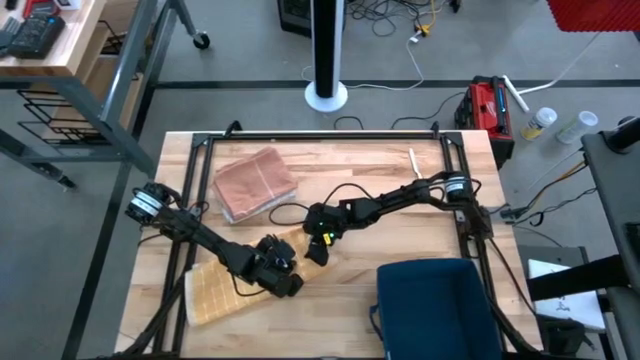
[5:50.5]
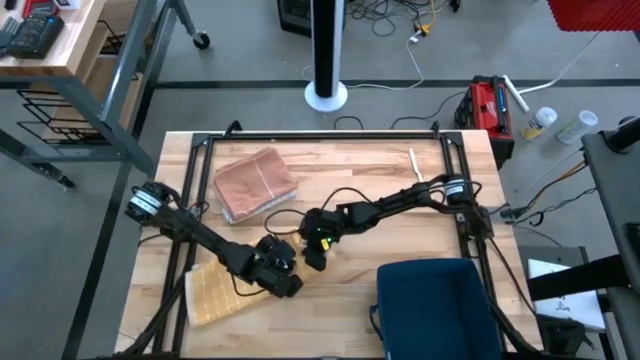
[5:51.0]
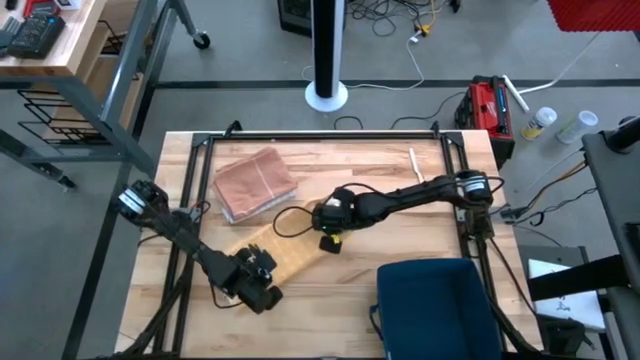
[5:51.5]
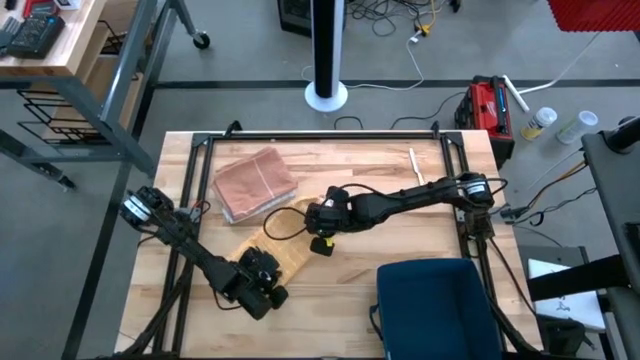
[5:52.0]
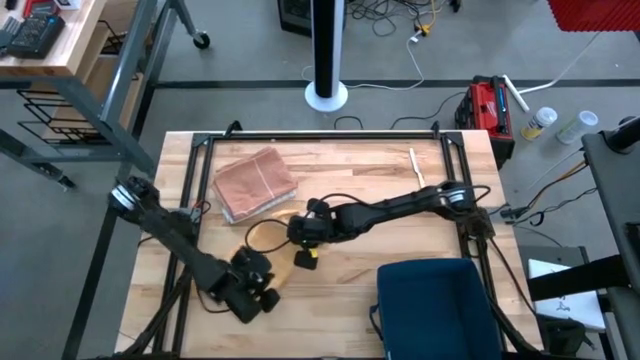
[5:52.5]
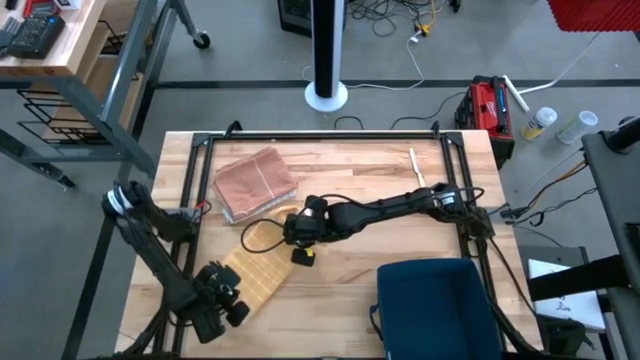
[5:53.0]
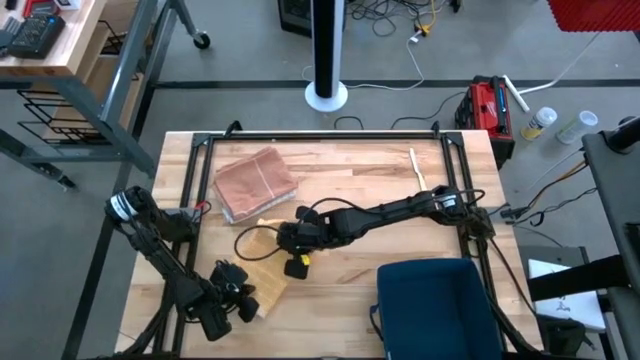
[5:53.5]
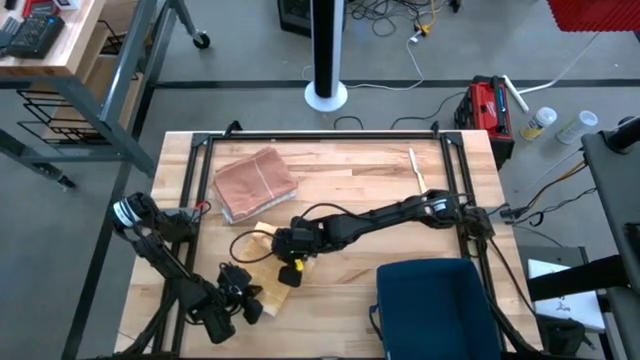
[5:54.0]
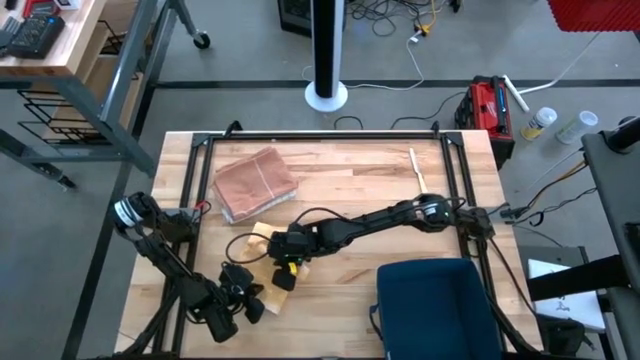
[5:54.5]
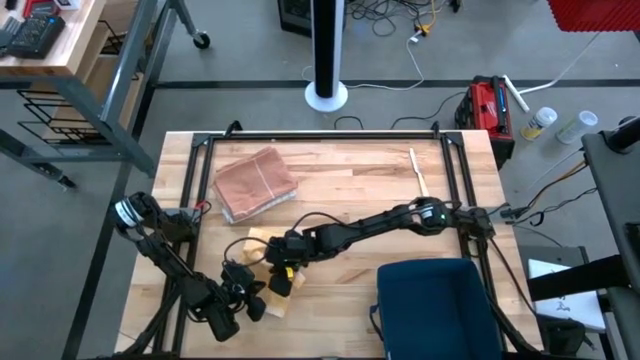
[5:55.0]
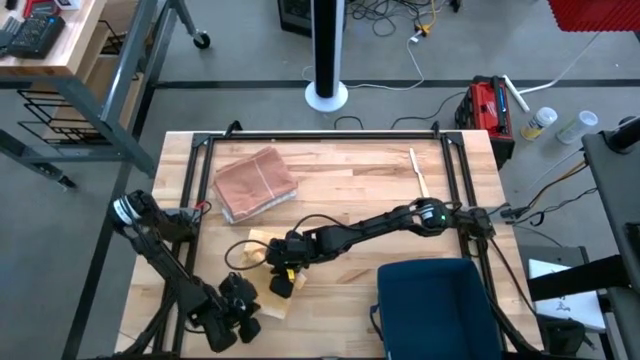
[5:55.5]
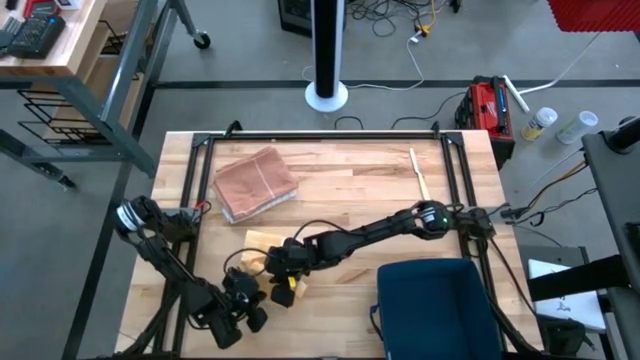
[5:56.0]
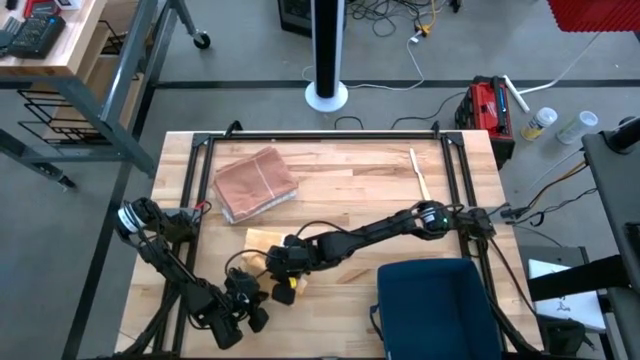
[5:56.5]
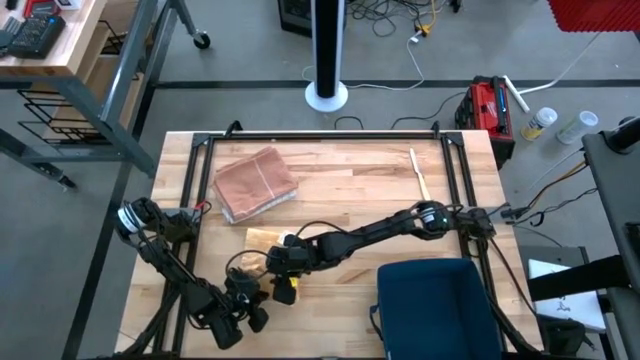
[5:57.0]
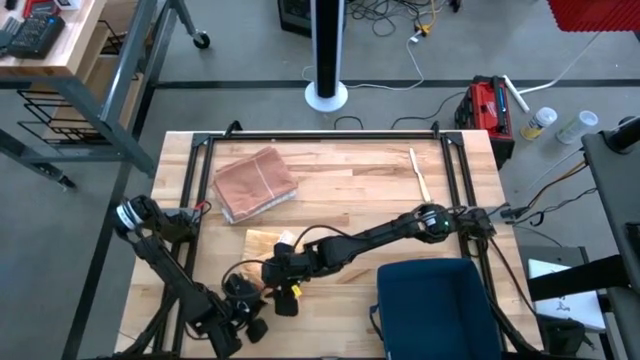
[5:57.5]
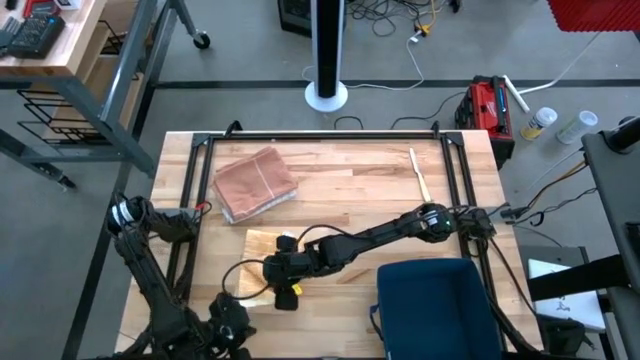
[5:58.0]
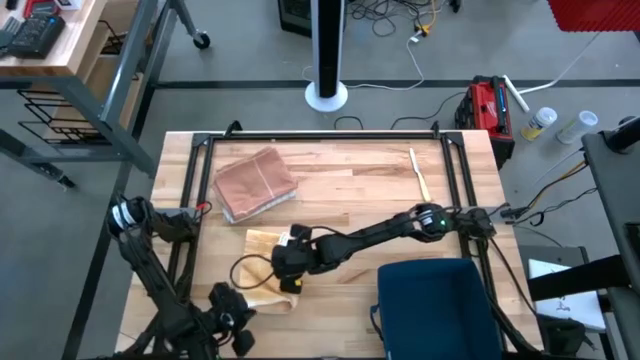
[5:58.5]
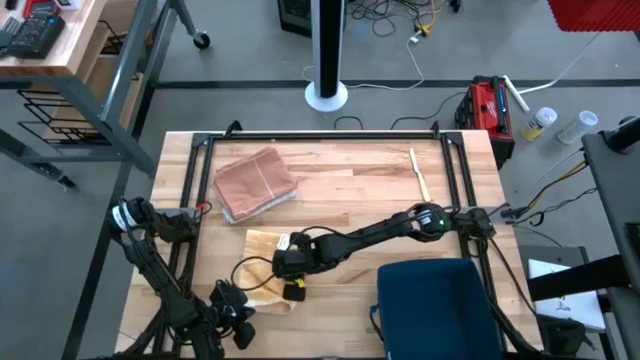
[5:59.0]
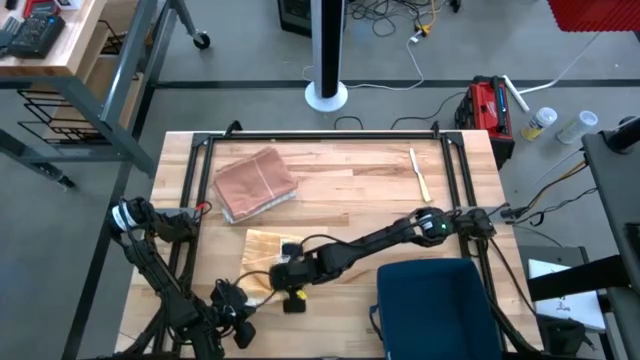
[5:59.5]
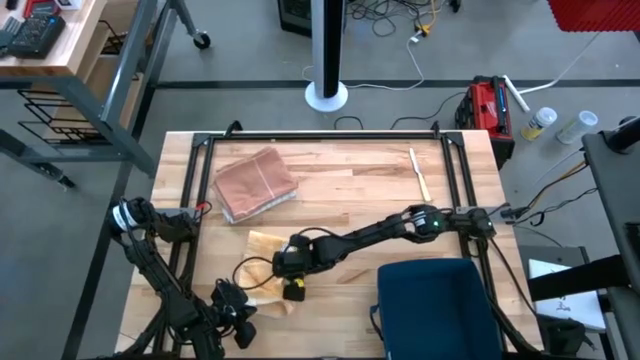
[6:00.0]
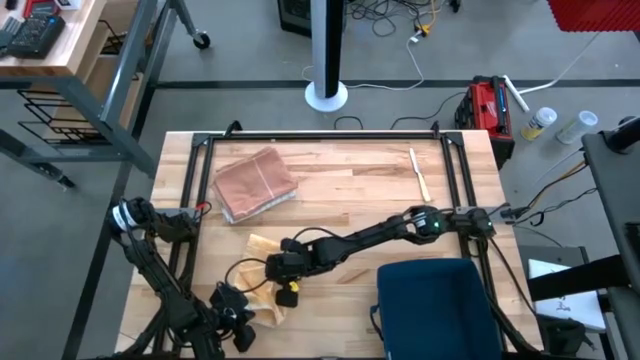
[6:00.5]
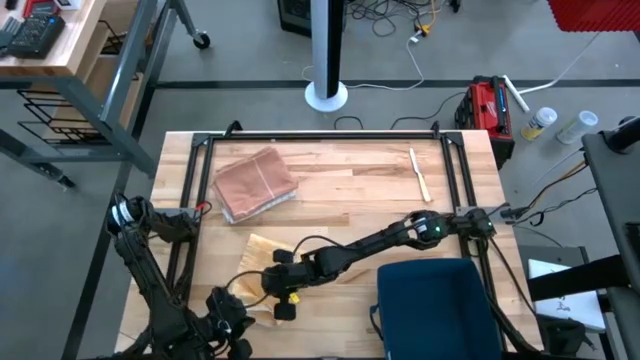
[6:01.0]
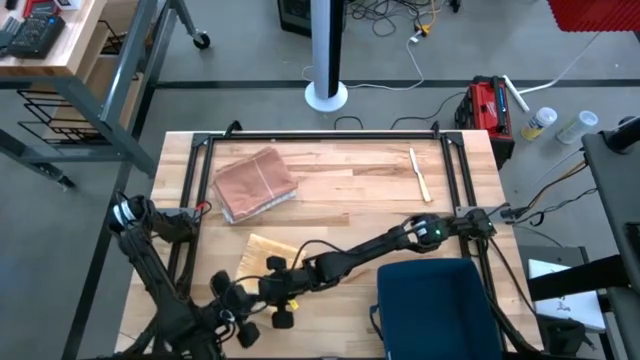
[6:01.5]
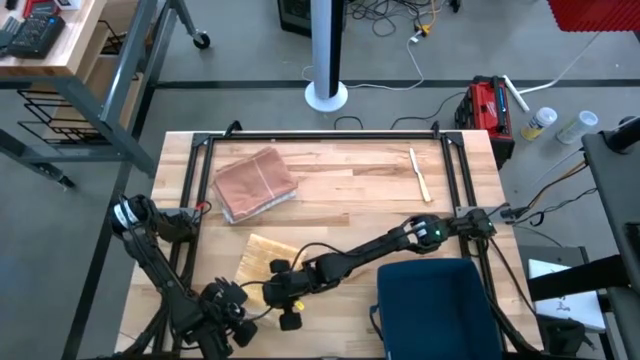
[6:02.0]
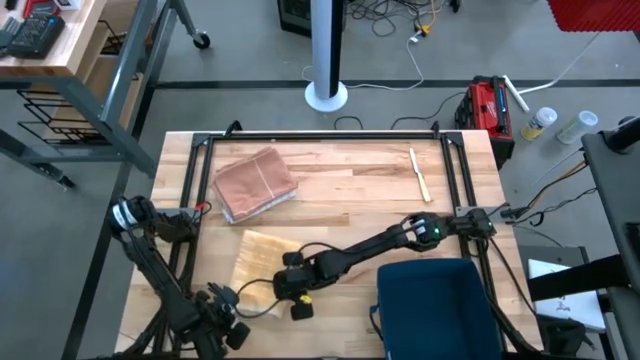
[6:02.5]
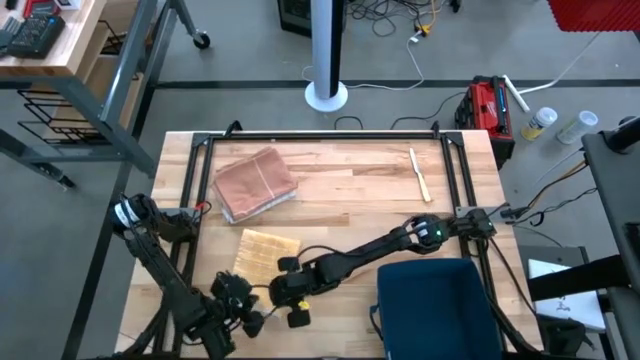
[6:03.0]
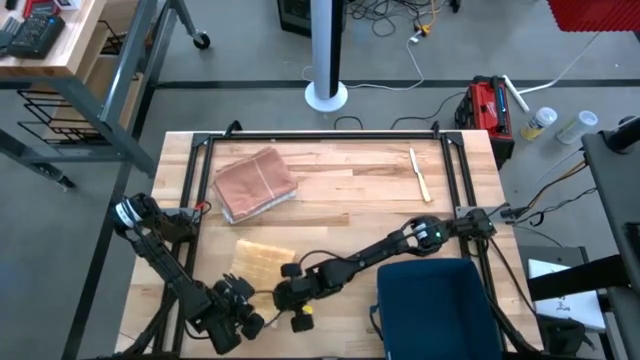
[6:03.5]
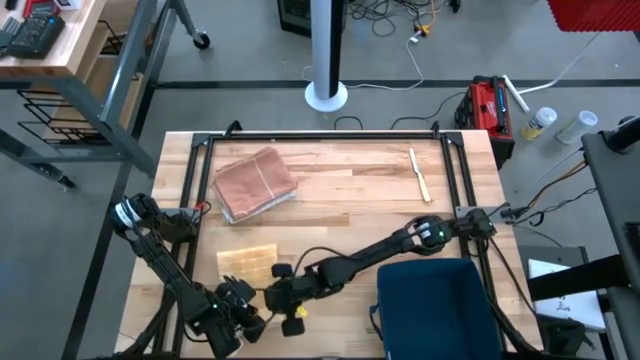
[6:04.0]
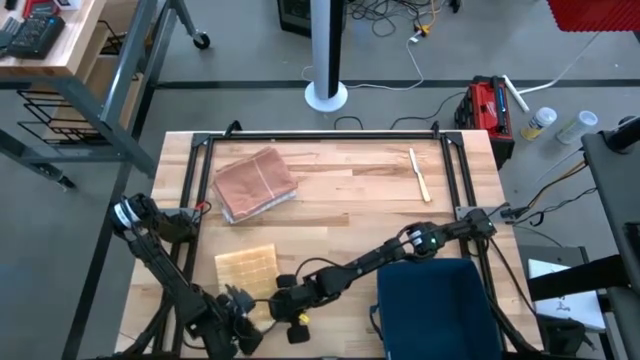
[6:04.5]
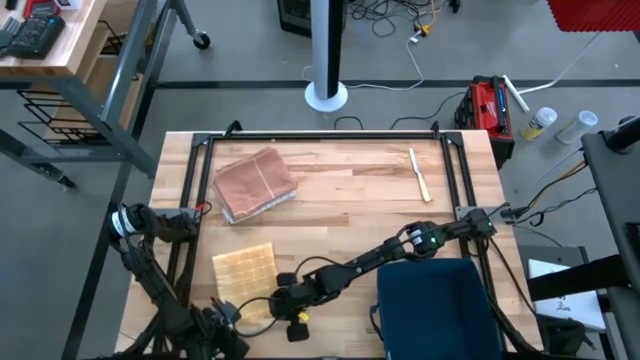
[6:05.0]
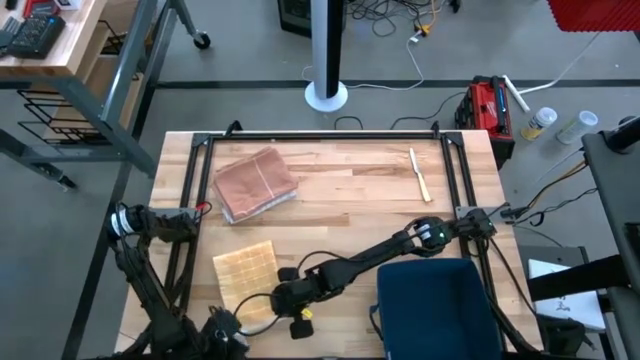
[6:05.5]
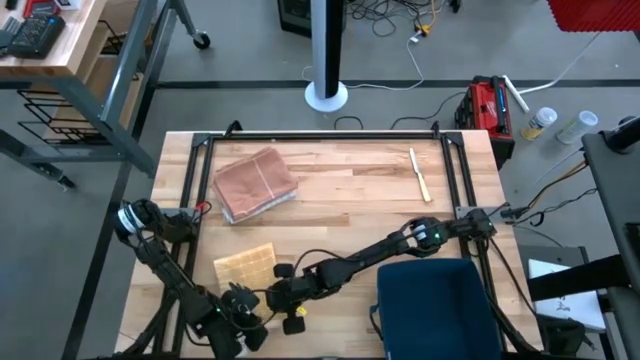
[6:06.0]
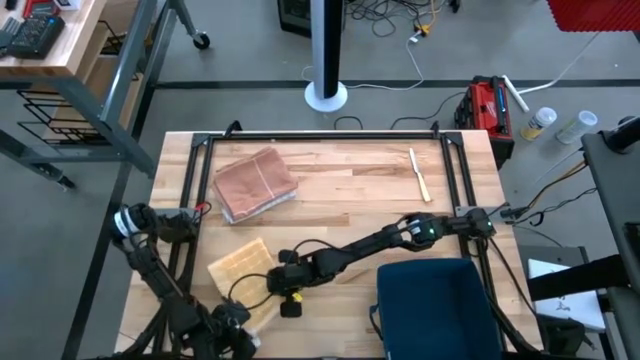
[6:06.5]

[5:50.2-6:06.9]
Task: Fold towel
Fold the yellow towel

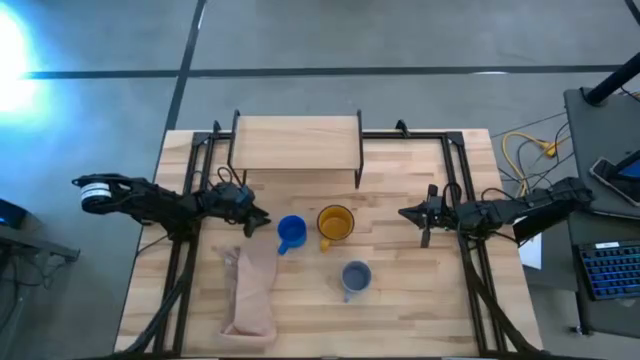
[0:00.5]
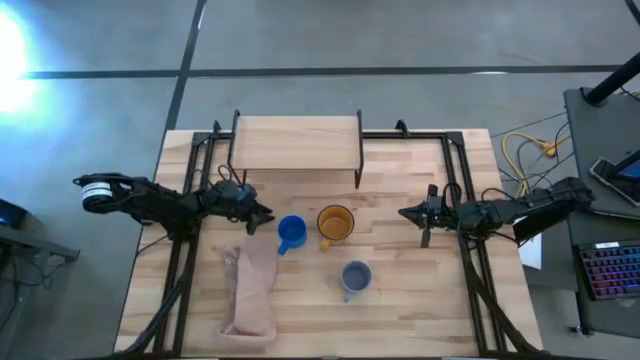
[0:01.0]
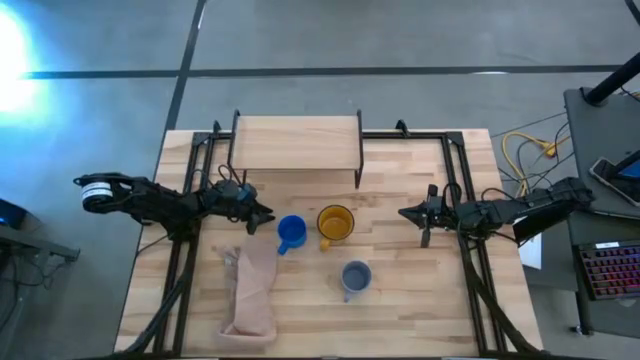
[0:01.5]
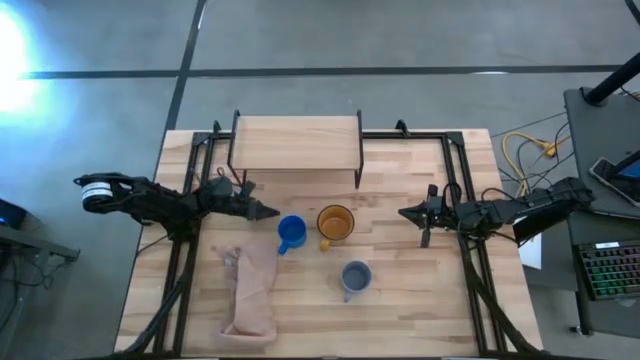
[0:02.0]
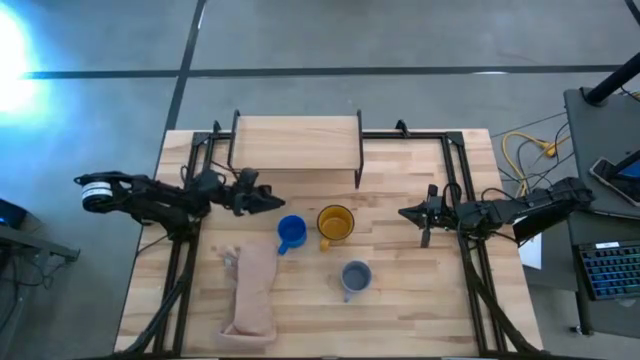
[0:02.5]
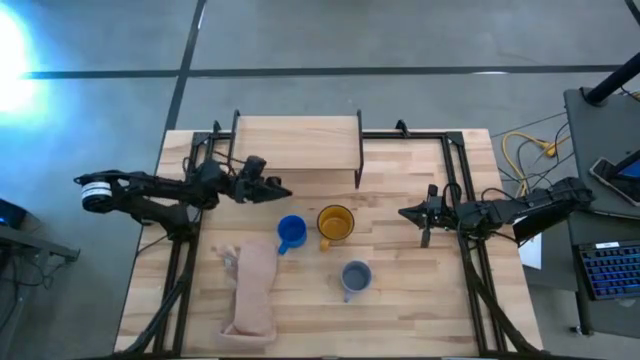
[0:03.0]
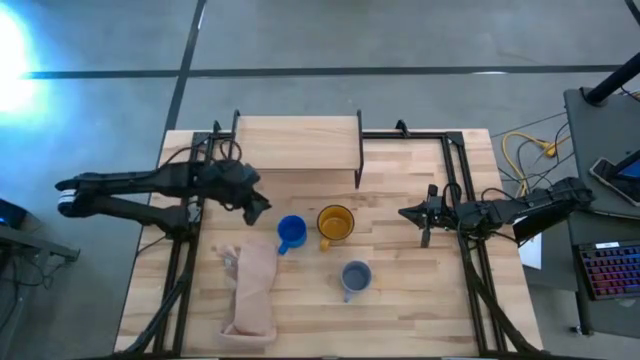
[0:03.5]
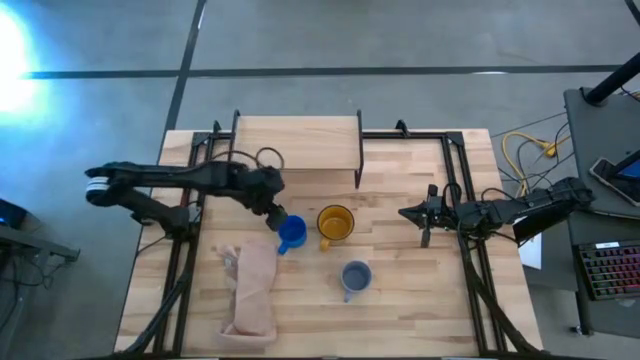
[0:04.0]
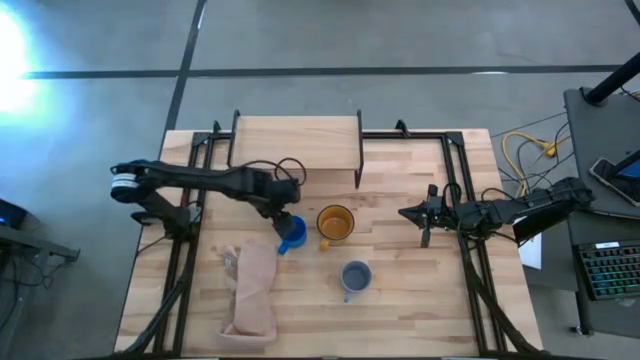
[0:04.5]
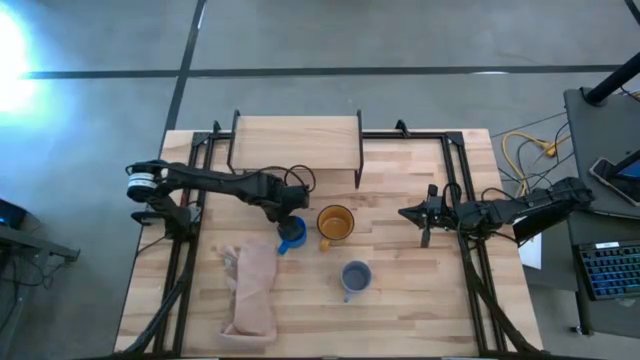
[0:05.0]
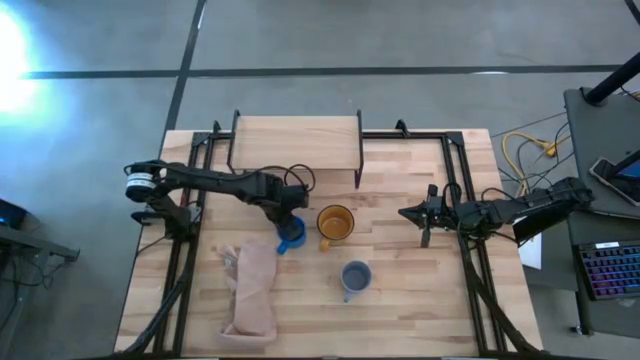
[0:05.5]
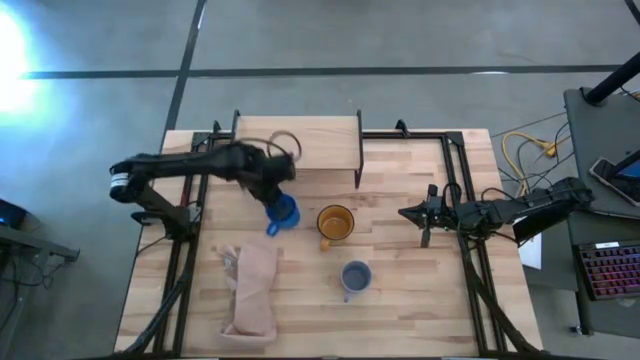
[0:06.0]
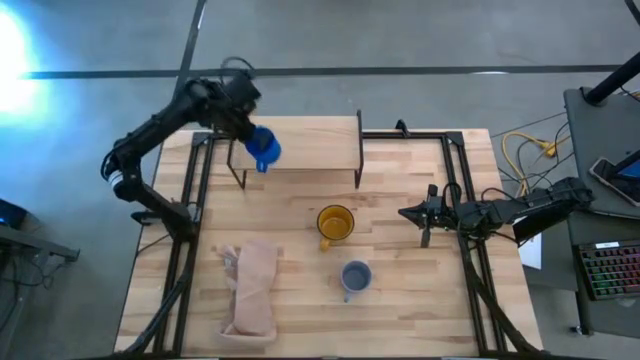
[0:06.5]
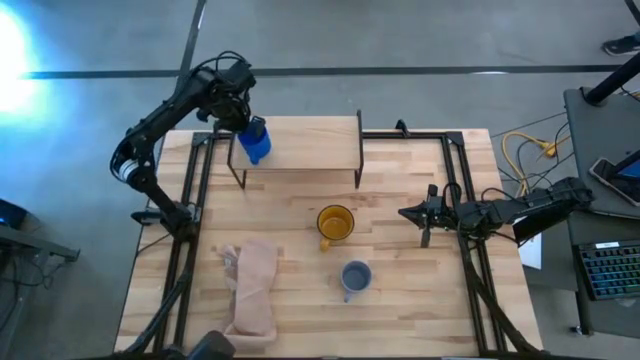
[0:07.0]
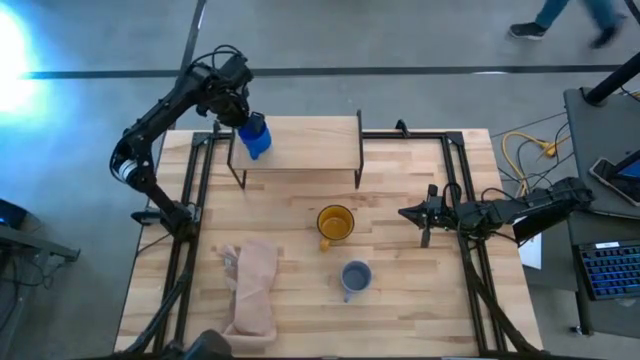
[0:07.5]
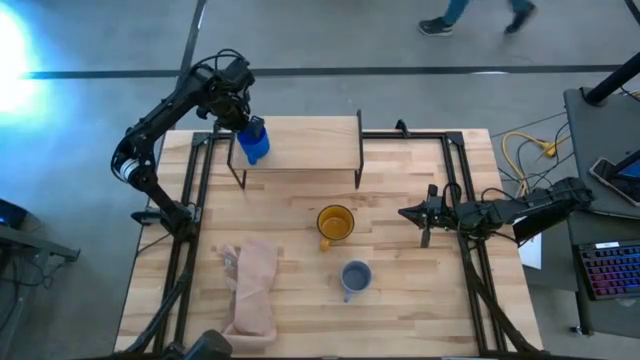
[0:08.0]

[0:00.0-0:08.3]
Task: Stack small to large cups/mugs on shelf
Put the blue mug on the shelf
